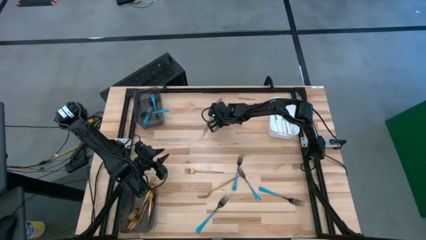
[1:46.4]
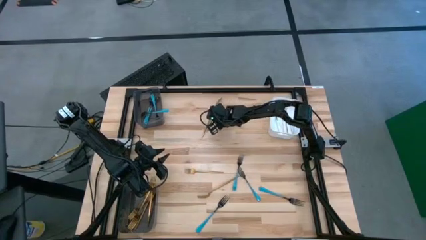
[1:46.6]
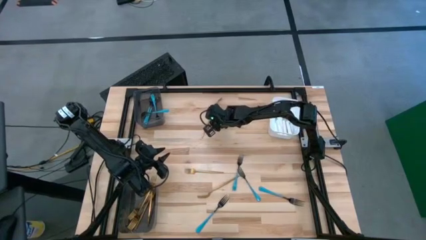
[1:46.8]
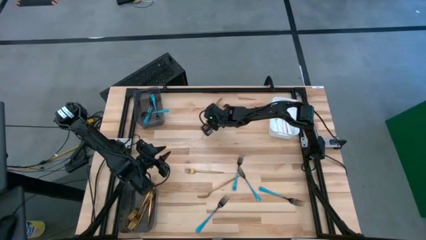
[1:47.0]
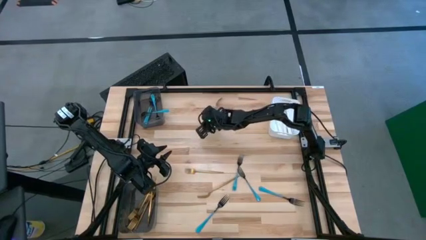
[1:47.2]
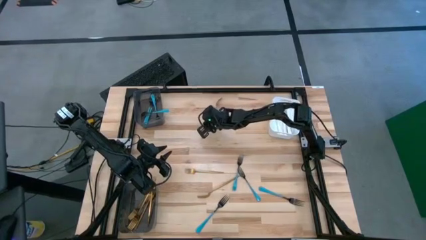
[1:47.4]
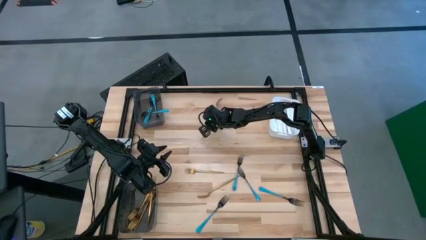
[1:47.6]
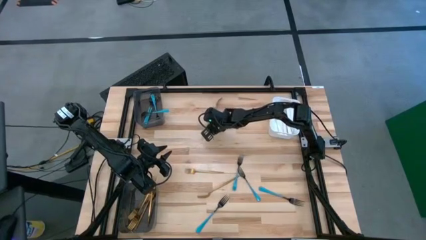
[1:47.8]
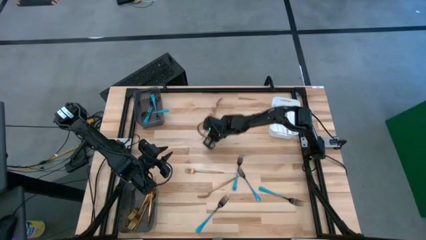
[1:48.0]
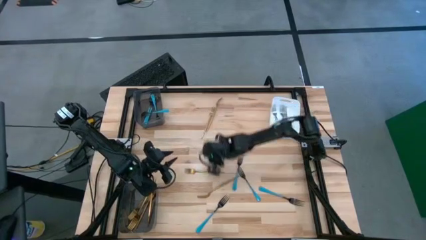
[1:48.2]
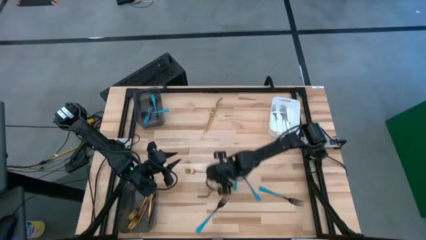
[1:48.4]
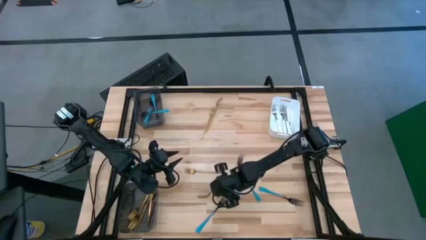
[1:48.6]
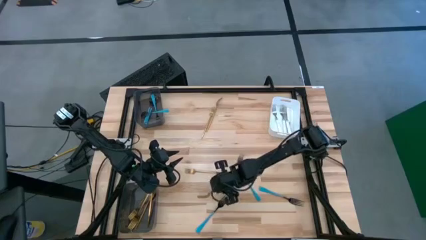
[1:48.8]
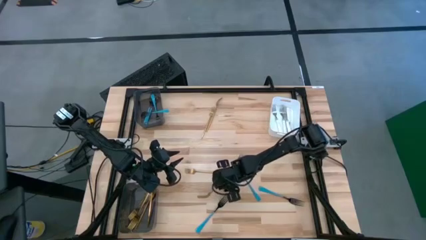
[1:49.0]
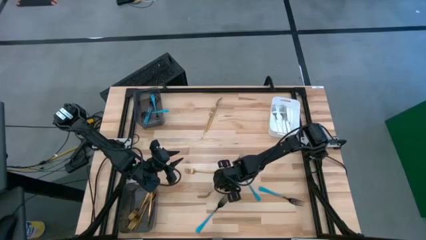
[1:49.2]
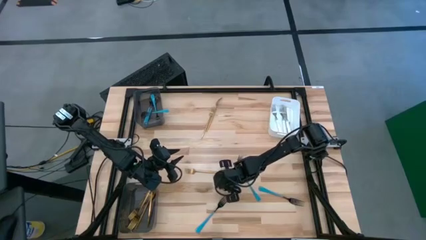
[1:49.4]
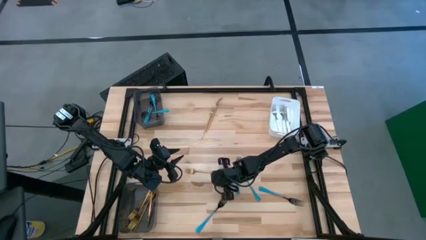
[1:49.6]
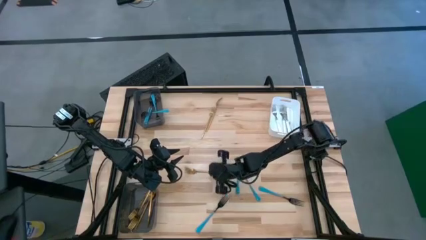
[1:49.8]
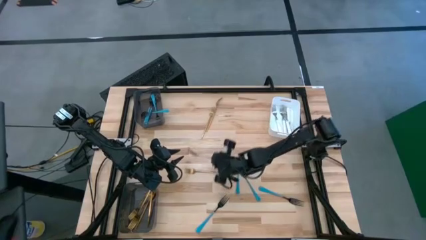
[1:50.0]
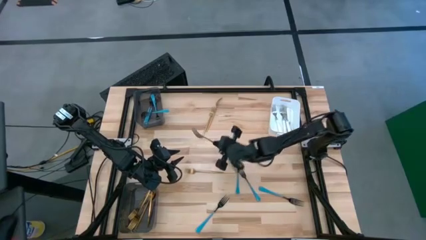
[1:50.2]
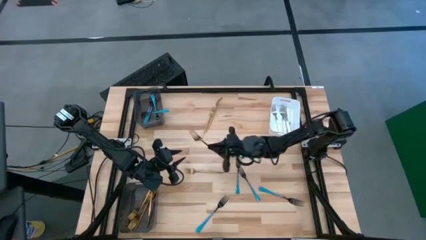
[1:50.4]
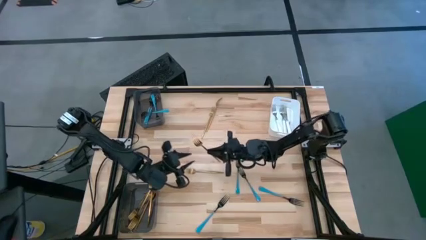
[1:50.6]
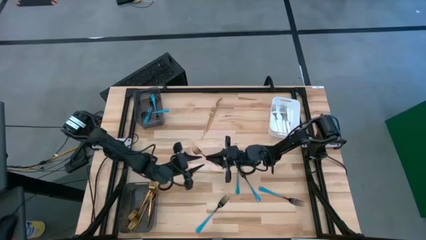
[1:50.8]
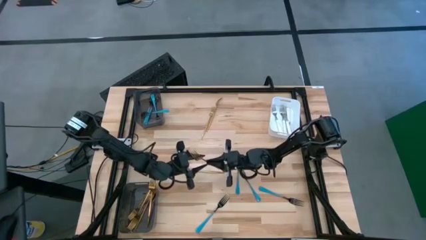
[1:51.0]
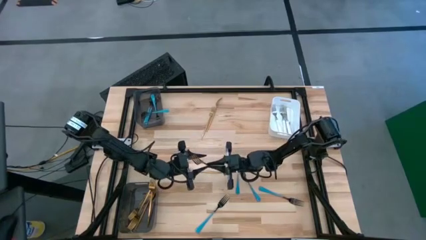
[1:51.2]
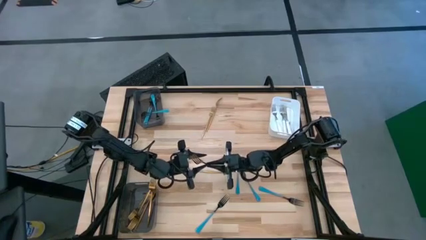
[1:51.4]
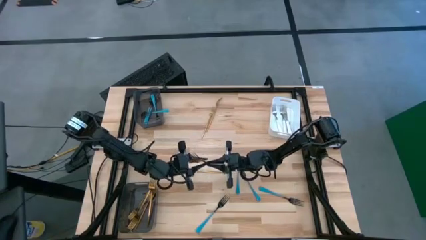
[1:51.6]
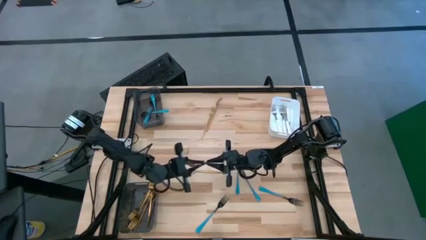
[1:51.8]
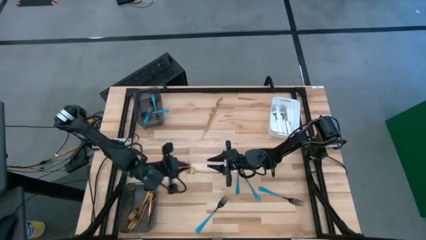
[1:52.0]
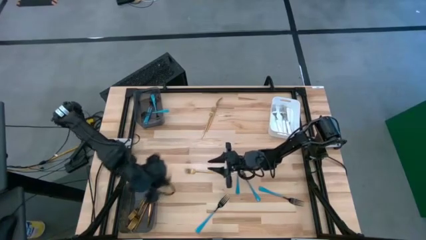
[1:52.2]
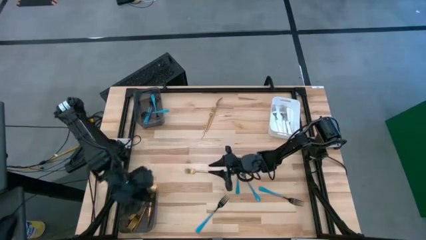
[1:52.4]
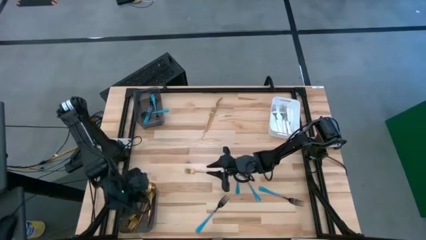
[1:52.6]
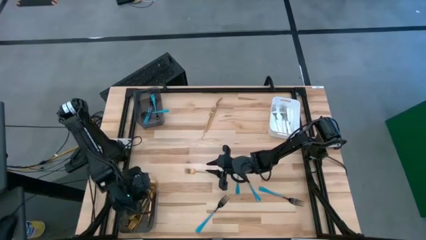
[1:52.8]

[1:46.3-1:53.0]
Task: Sort silverware by color (type)
Put the gold fork into the bottom black bin

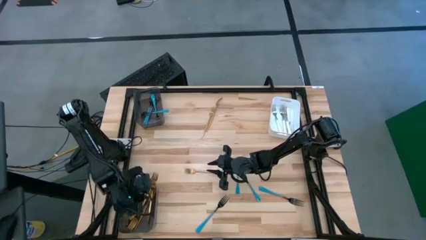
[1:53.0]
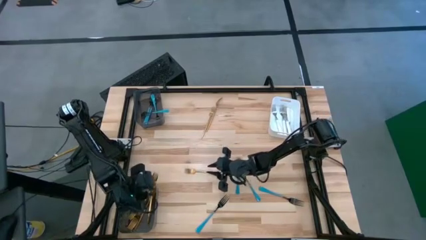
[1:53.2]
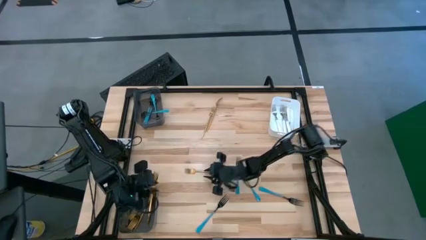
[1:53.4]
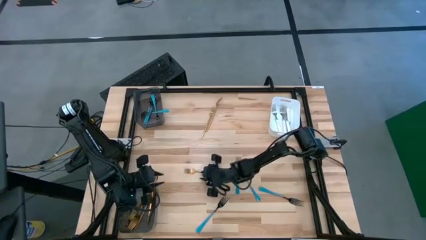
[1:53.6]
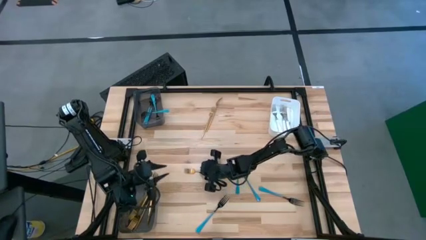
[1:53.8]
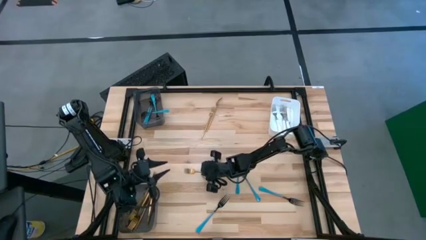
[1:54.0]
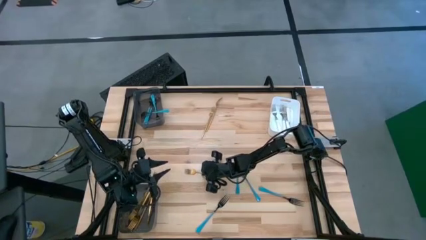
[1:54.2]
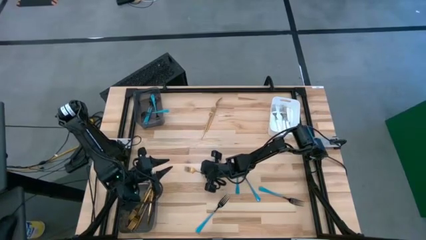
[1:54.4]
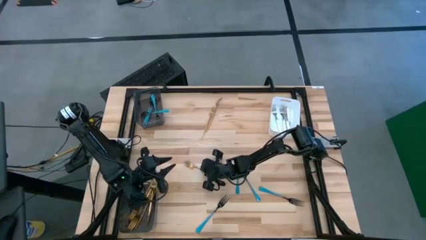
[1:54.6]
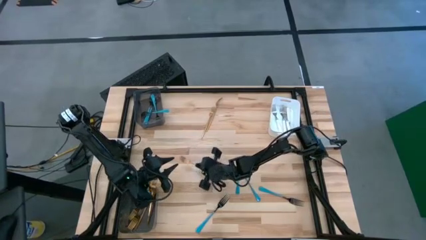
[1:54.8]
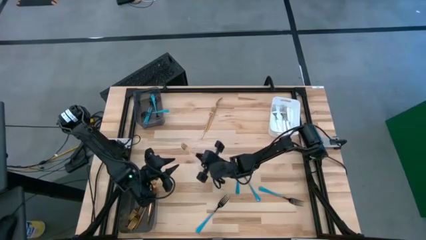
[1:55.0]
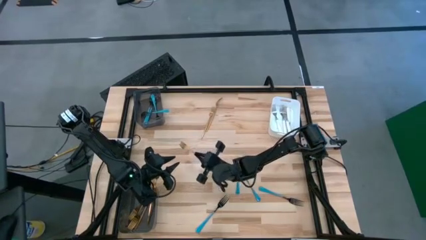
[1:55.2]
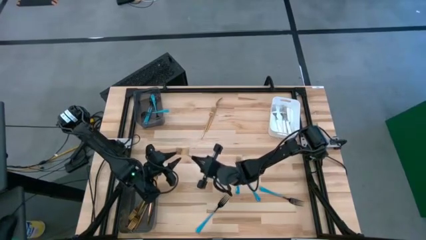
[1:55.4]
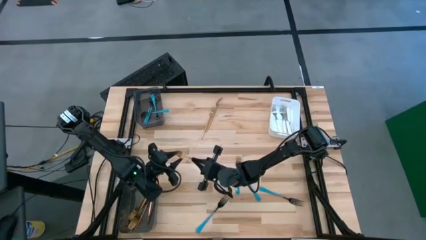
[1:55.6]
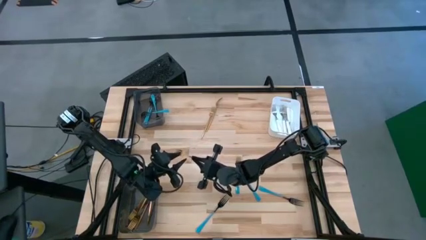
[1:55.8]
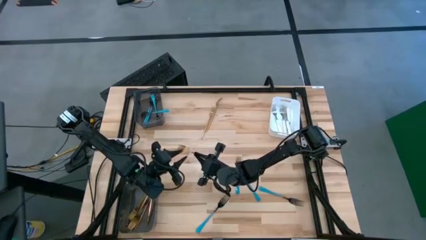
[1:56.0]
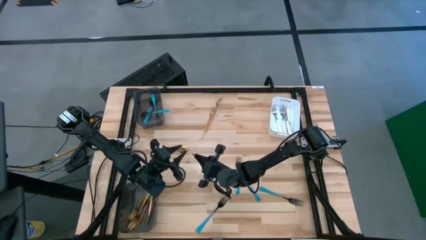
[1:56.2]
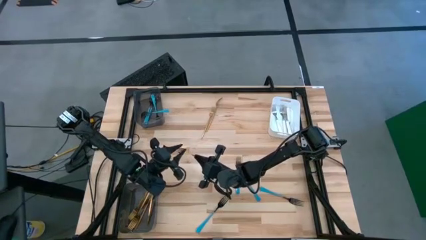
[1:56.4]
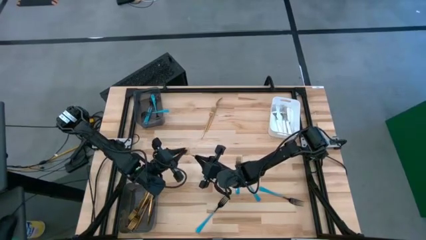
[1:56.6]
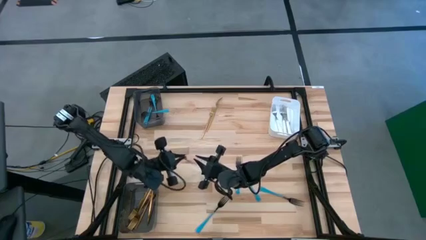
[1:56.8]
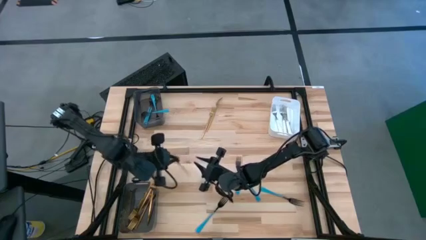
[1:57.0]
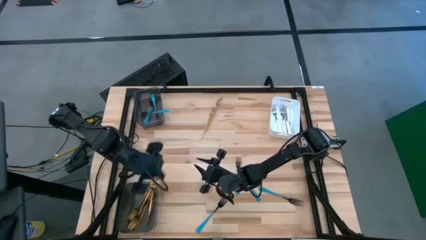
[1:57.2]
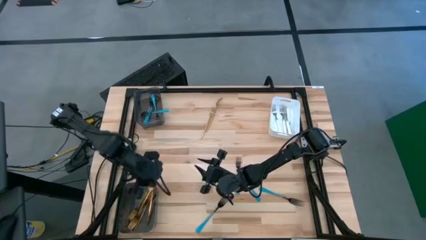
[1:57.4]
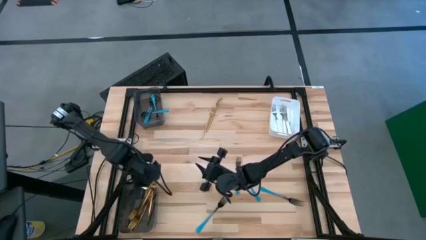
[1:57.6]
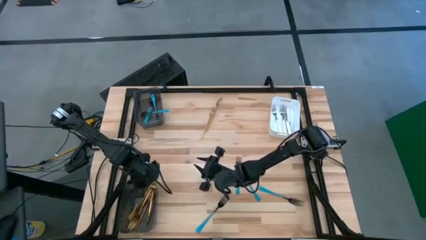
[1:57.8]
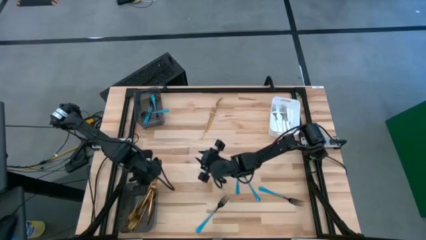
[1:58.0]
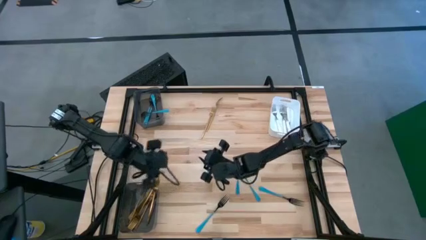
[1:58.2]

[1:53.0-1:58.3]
Put the gold fork into the bottom black bin

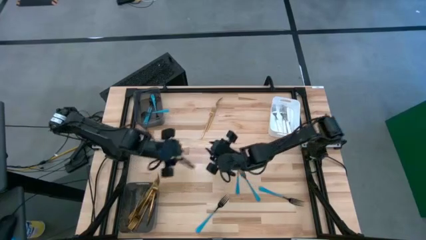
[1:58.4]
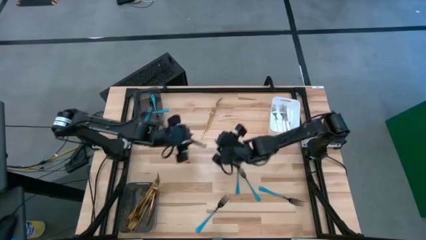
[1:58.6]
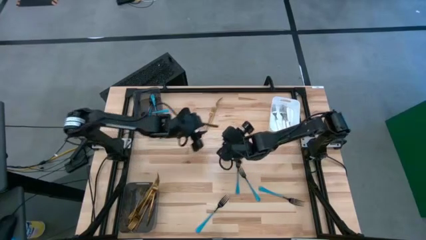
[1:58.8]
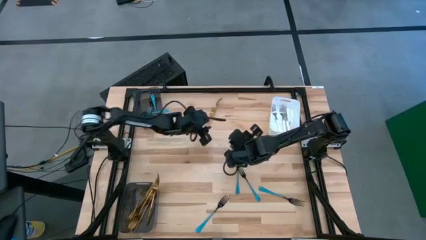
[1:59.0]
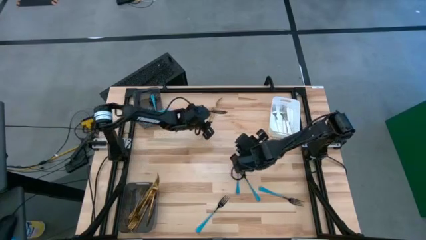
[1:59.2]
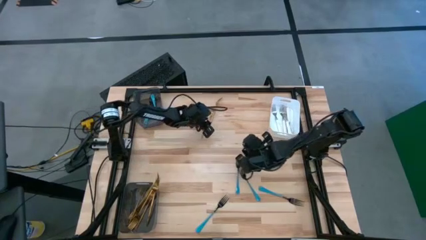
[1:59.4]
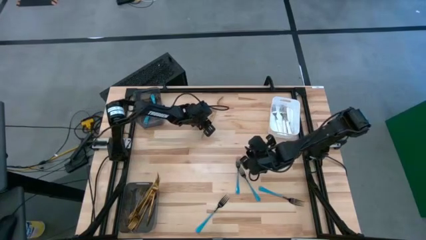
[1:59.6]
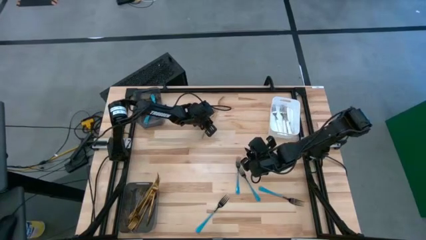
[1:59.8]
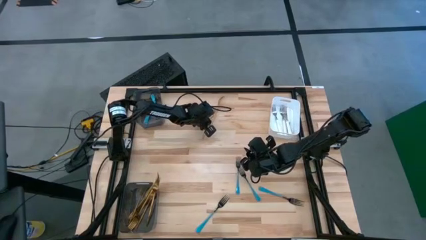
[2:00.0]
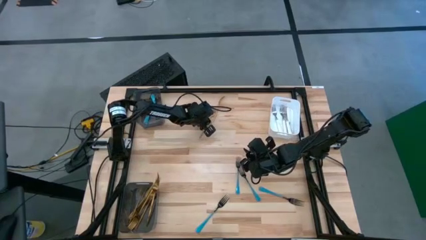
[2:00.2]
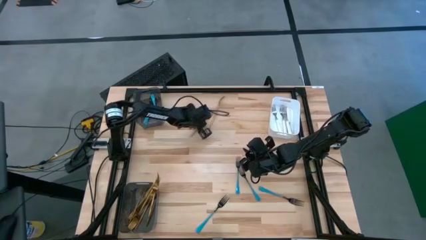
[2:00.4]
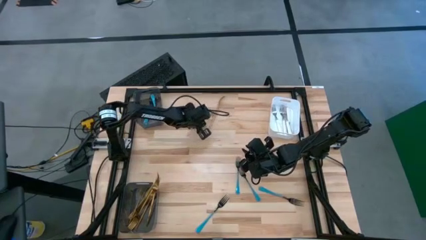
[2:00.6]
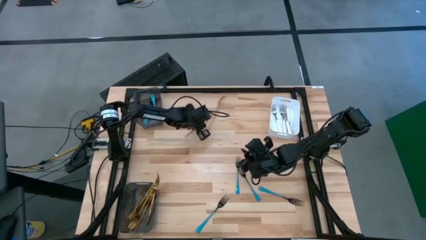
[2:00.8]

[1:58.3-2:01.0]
Put the gold fork into the bottom black bin

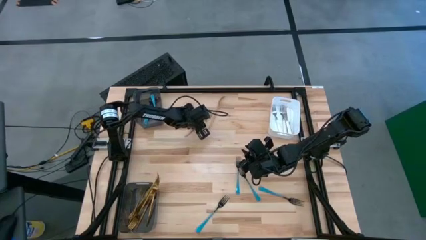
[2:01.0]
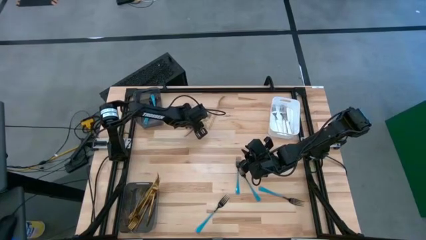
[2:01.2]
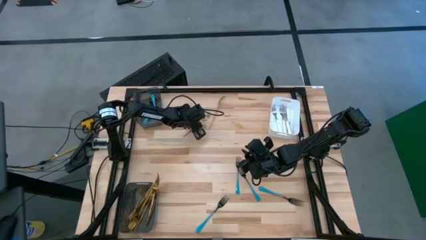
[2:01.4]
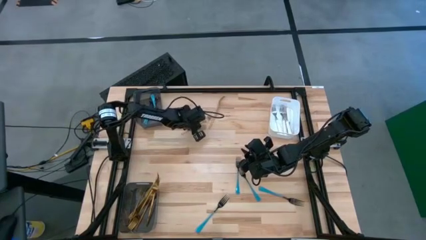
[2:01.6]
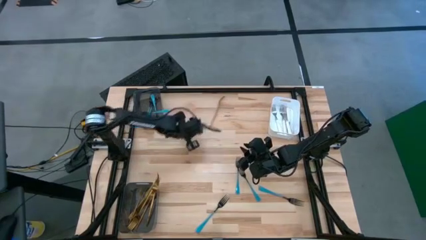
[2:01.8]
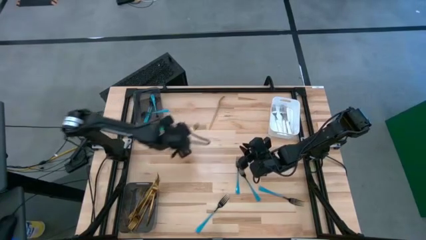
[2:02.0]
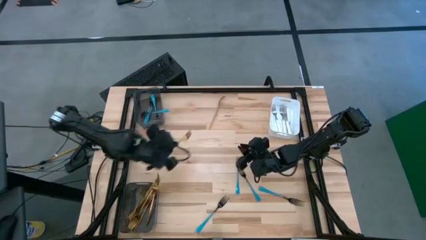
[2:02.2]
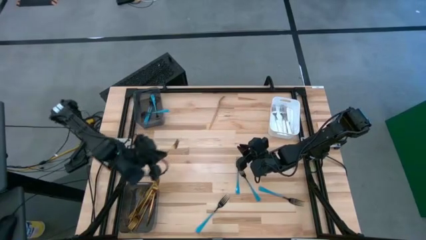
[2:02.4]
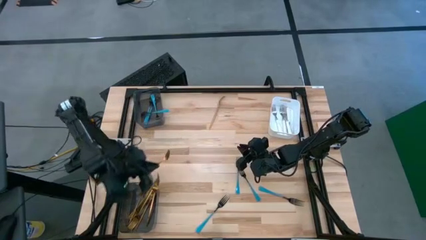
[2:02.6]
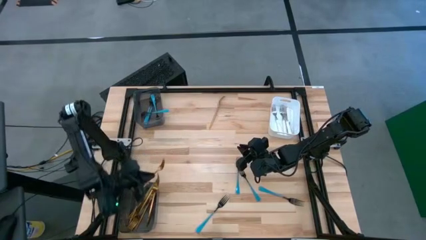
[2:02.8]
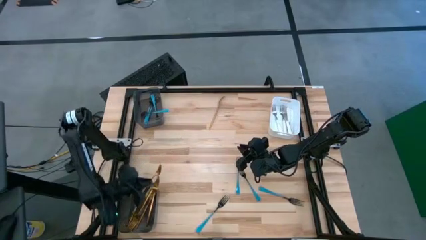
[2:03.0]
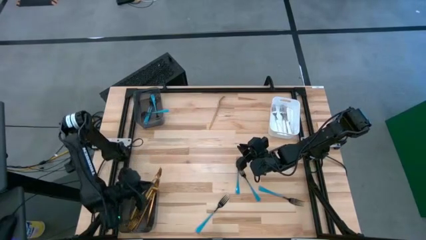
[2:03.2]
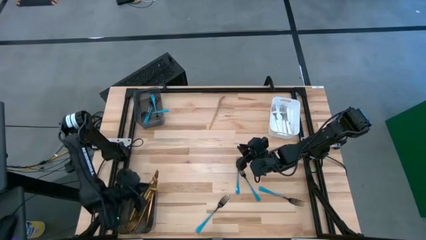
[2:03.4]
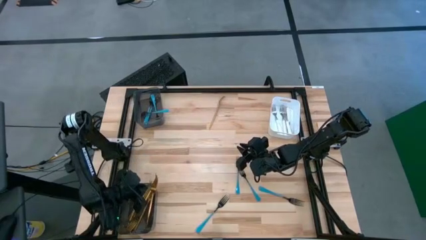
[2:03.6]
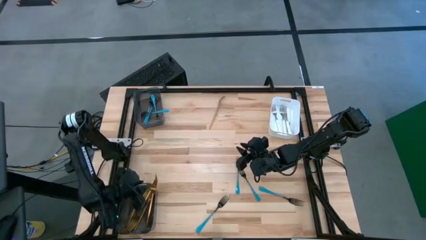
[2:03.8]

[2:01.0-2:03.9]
Put the gold fork into the bottom black bin
